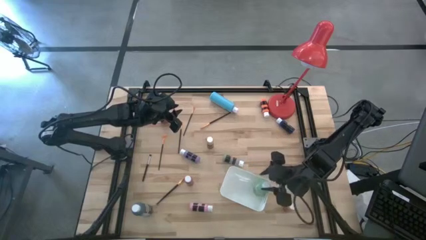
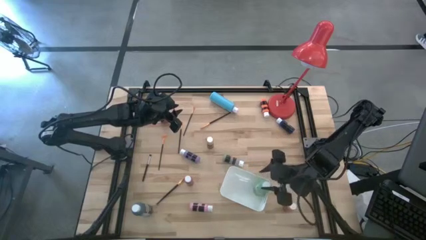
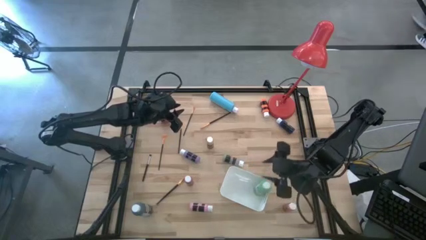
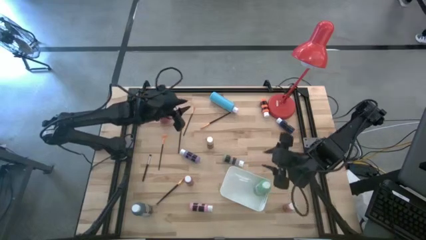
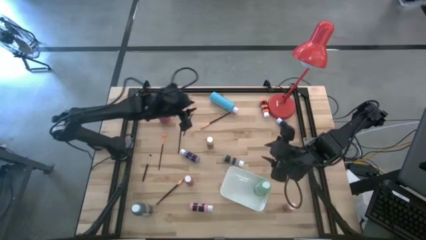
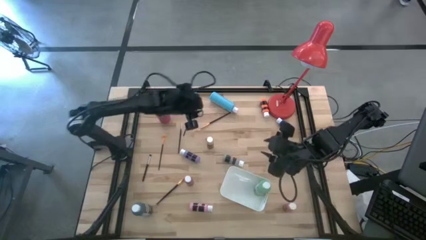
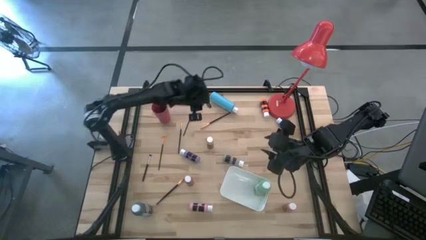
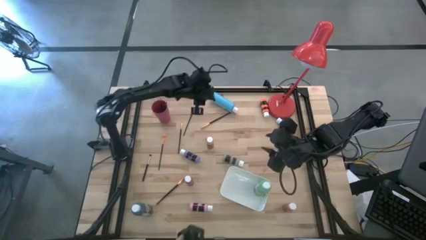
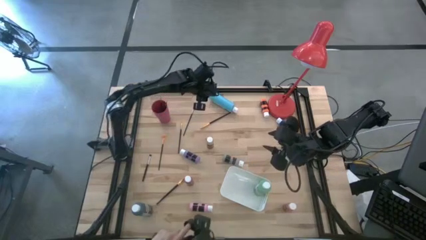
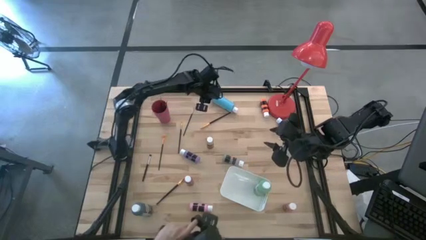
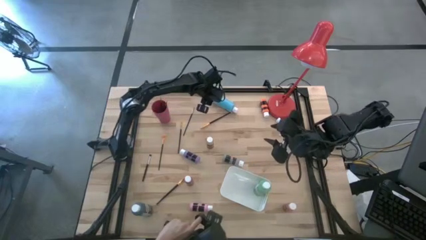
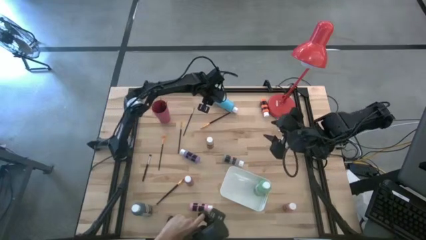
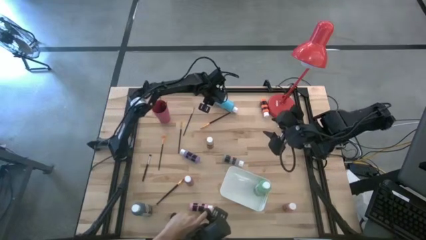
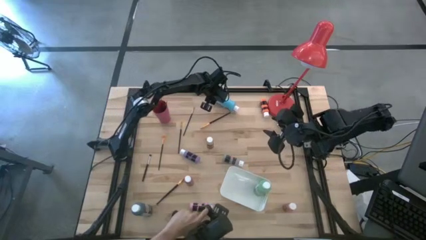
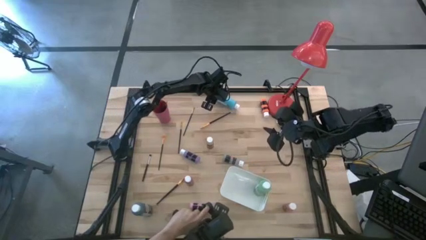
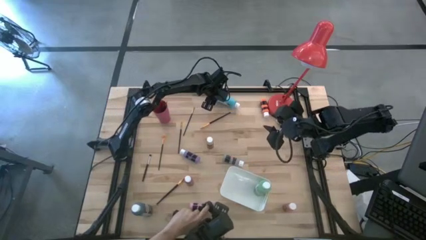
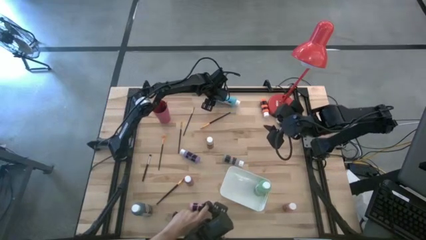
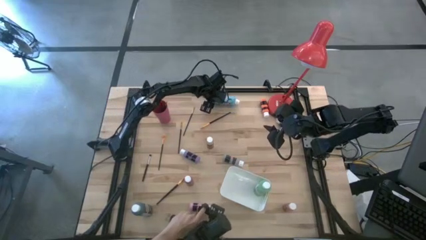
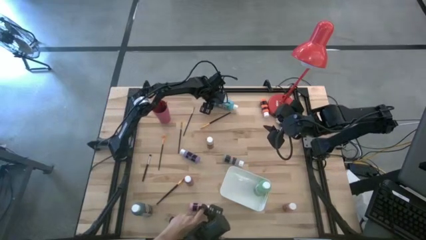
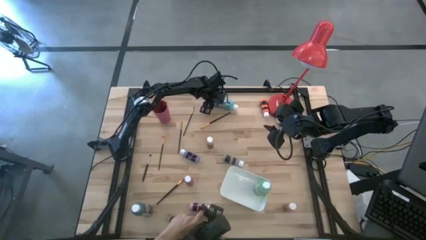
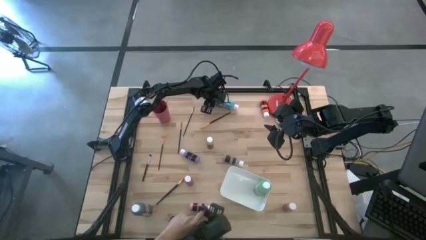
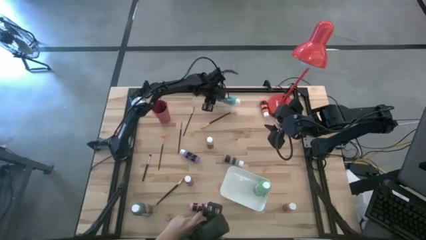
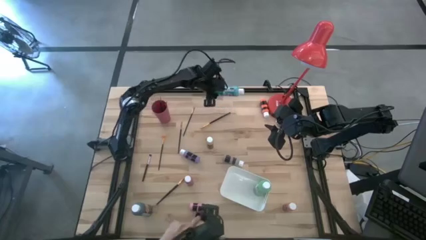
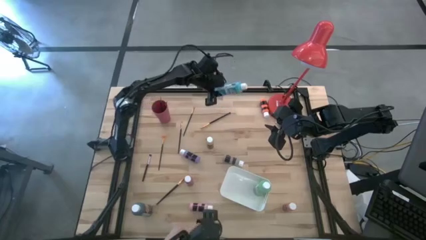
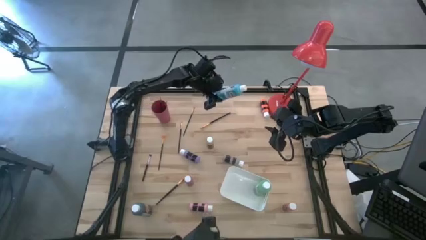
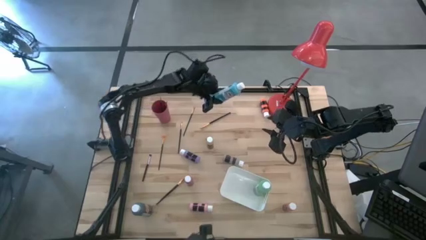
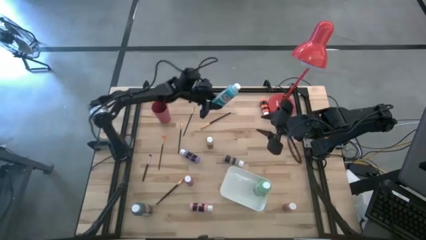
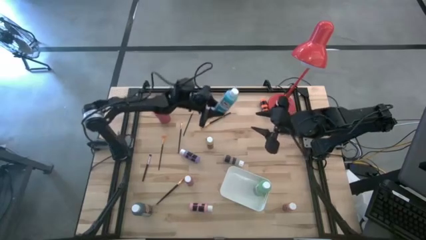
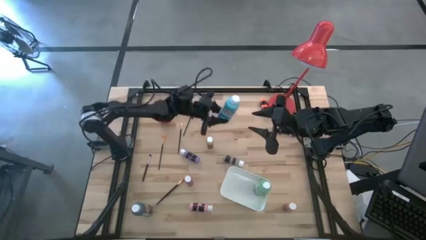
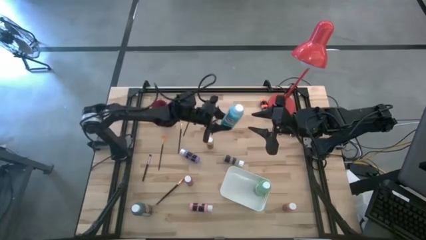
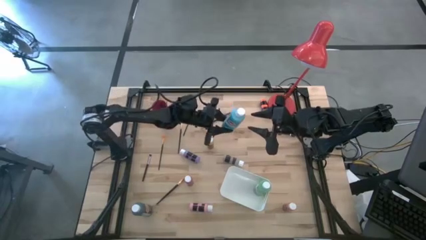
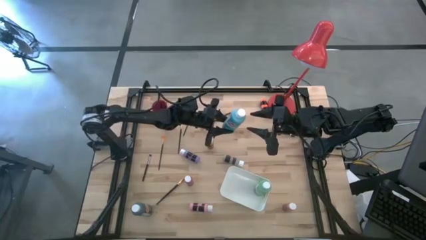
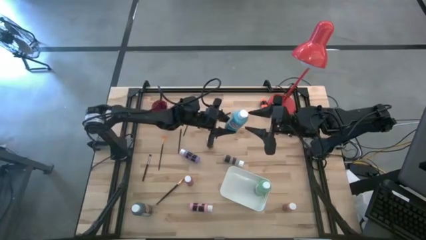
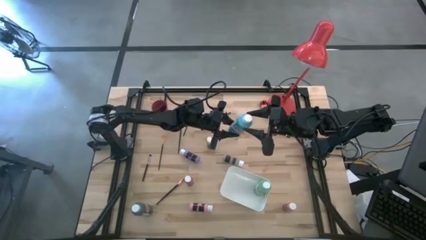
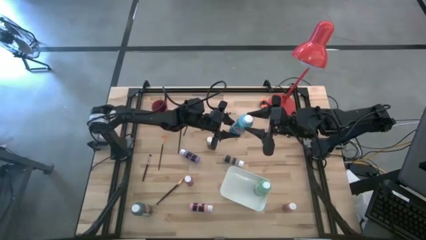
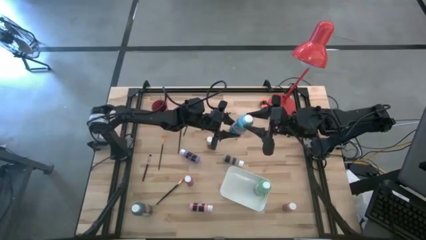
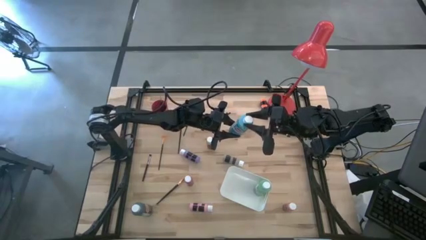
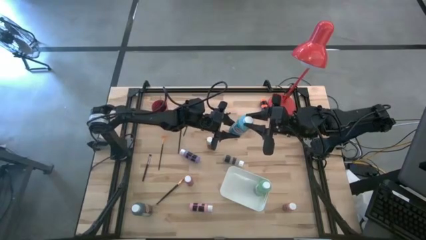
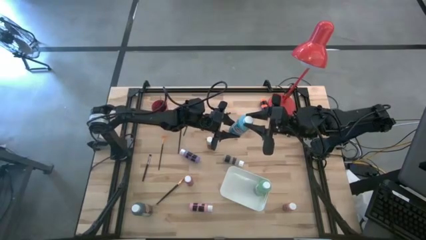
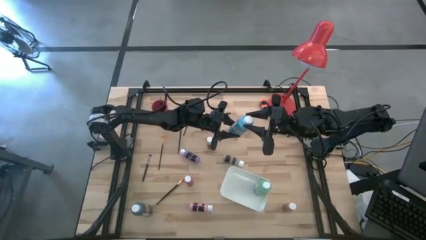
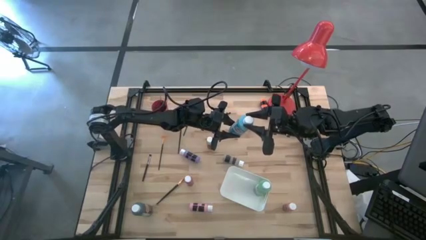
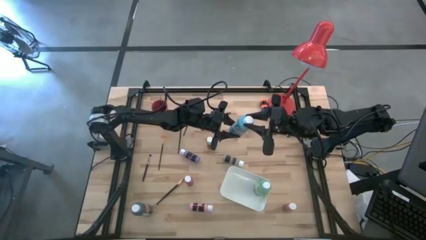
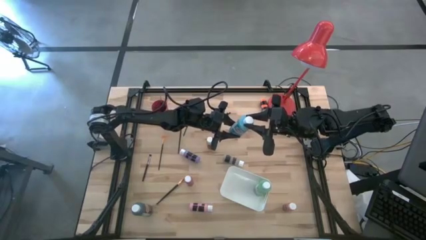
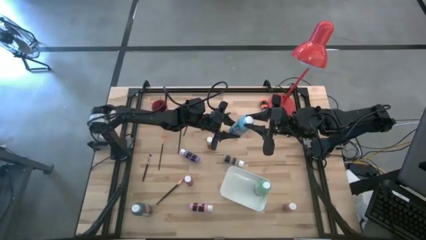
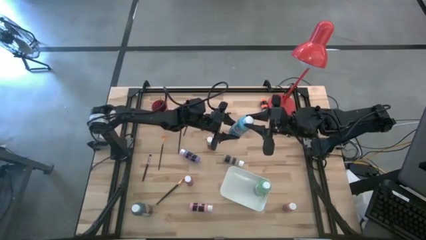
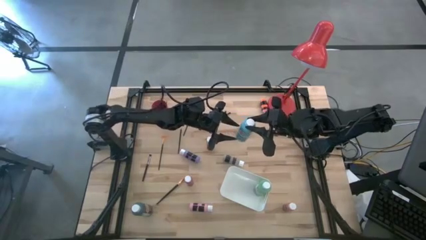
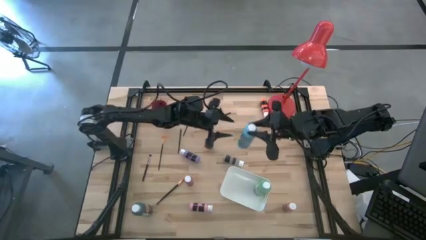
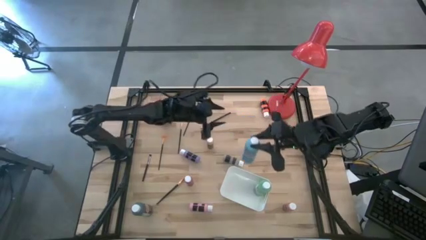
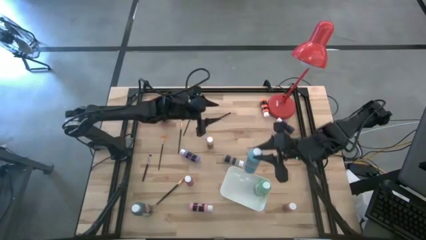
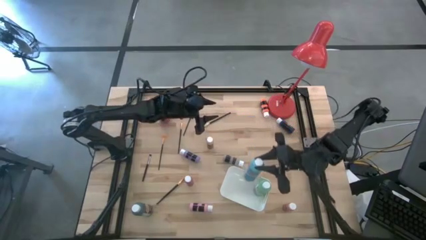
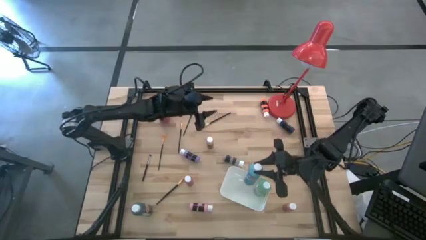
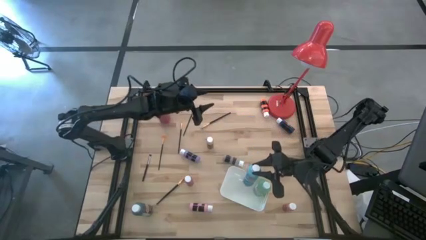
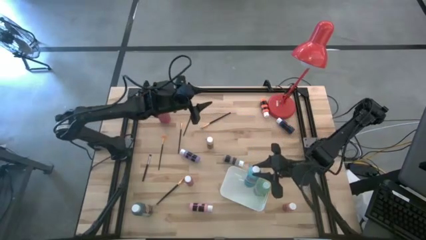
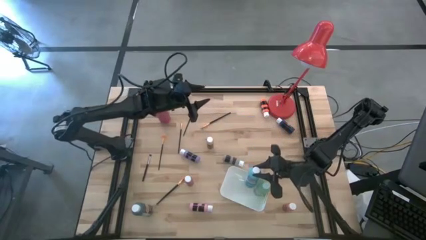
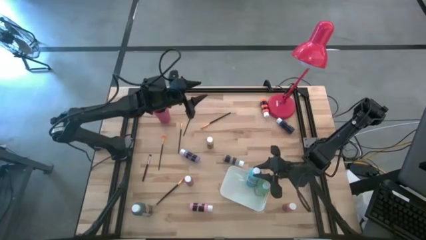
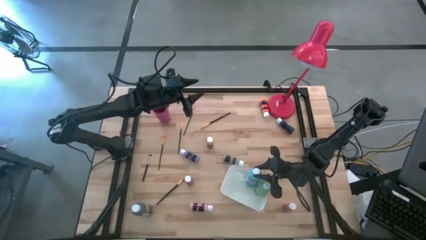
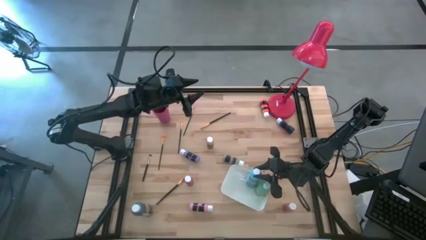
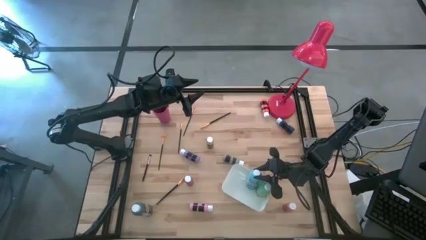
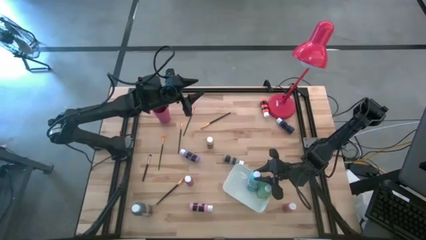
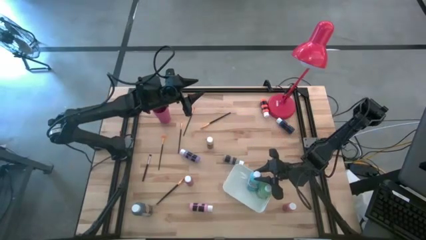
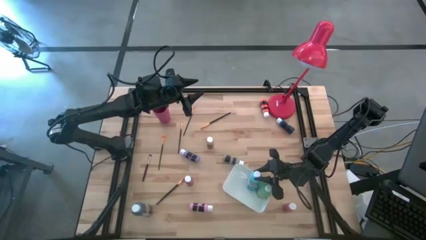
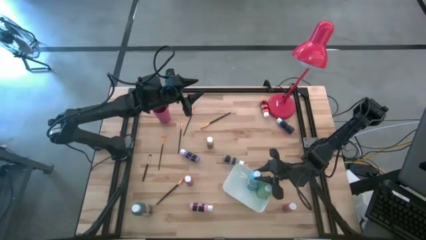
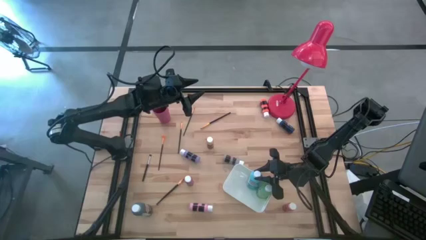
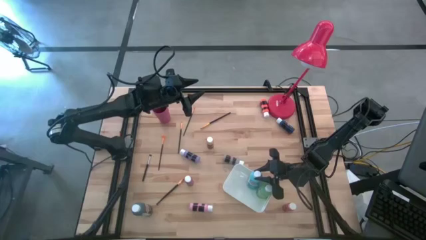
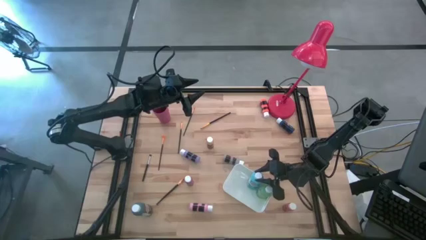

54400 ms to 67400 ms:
Task: Pick & Place Paint Supplies
Put the light blue paint bottle into the white bin
